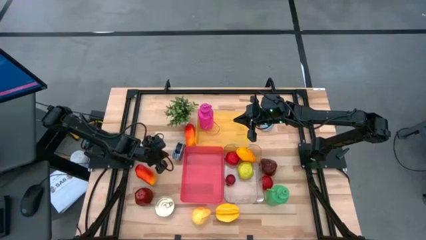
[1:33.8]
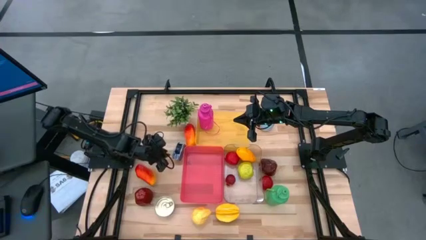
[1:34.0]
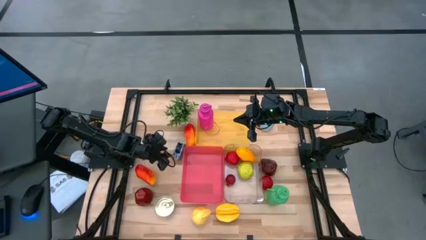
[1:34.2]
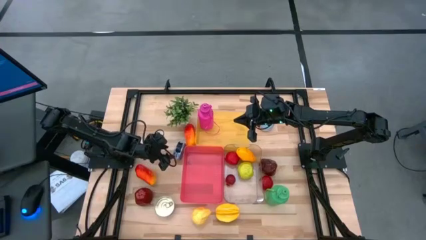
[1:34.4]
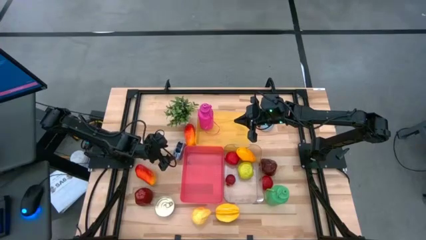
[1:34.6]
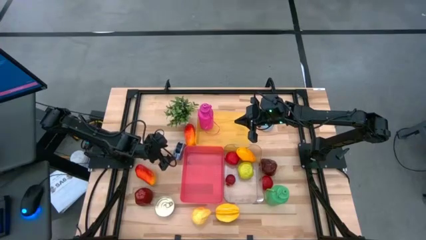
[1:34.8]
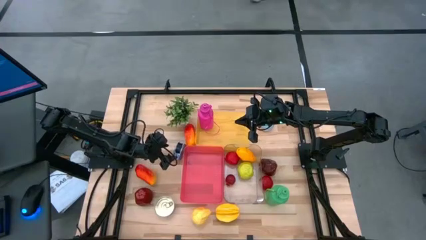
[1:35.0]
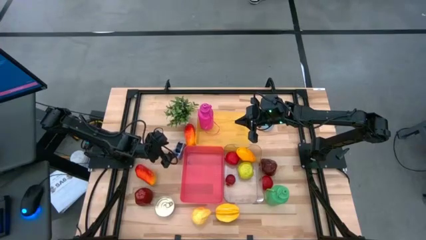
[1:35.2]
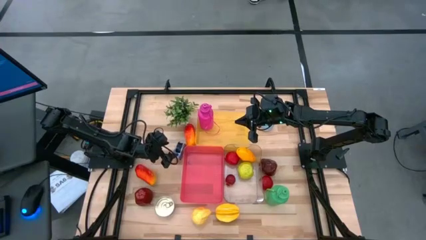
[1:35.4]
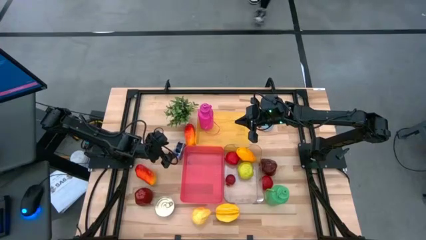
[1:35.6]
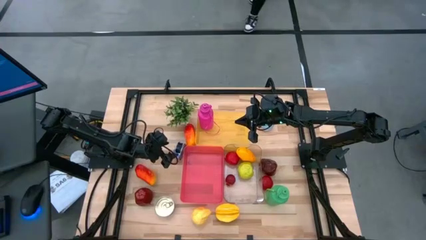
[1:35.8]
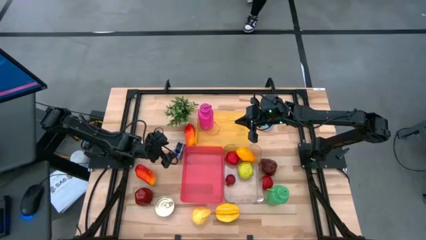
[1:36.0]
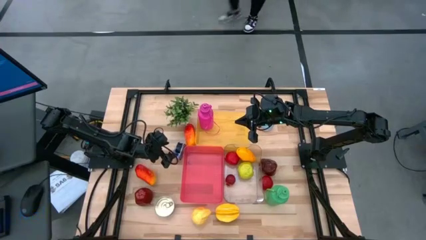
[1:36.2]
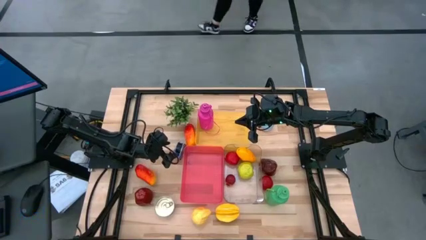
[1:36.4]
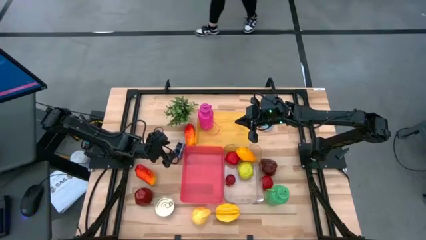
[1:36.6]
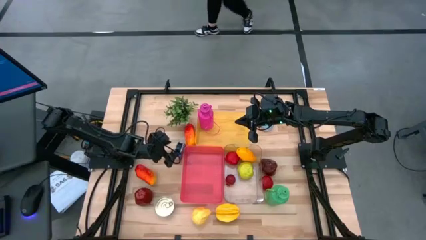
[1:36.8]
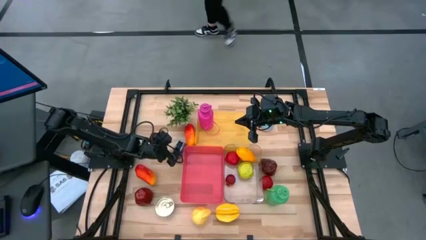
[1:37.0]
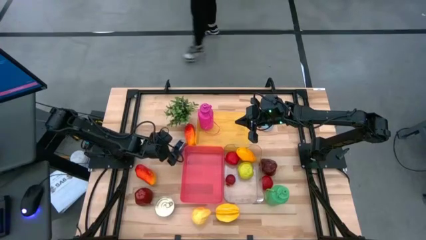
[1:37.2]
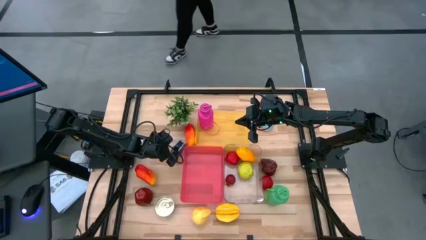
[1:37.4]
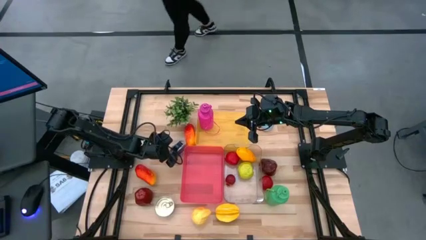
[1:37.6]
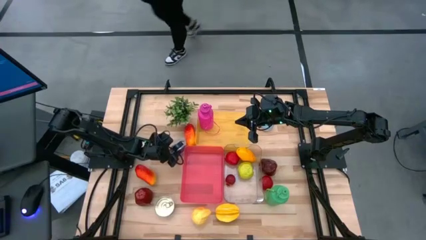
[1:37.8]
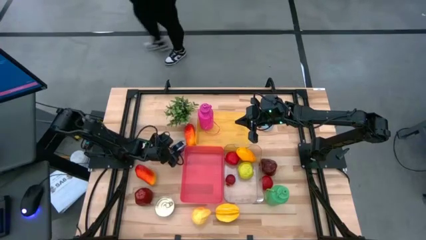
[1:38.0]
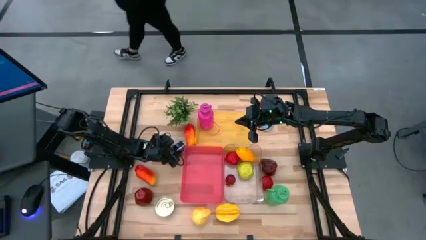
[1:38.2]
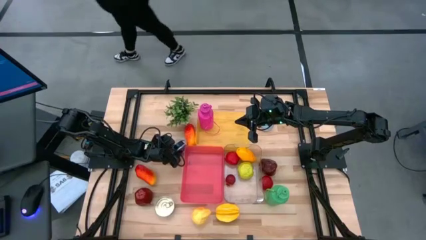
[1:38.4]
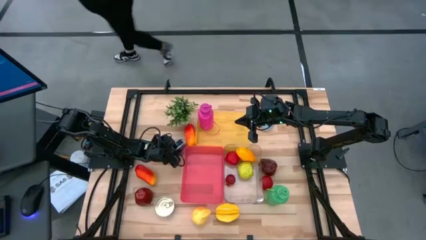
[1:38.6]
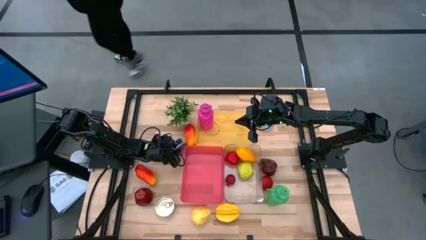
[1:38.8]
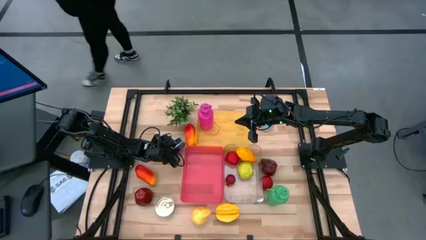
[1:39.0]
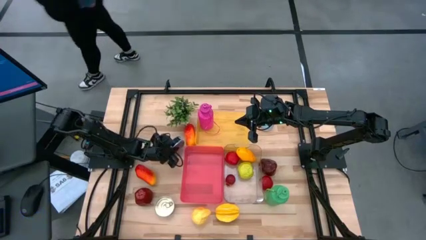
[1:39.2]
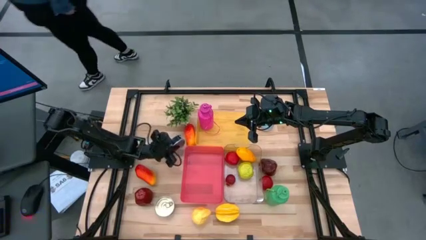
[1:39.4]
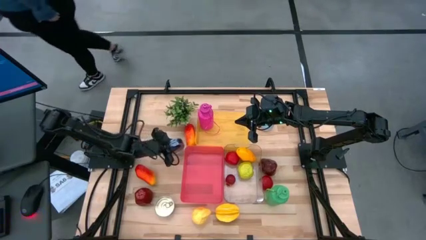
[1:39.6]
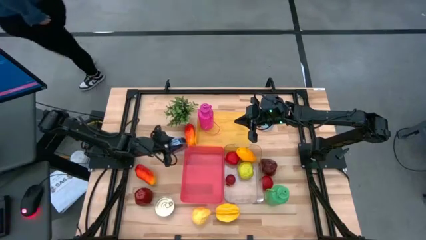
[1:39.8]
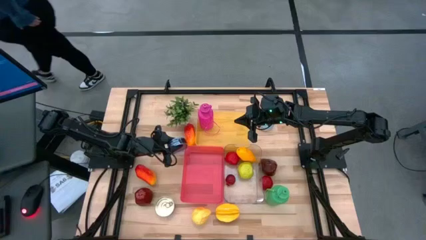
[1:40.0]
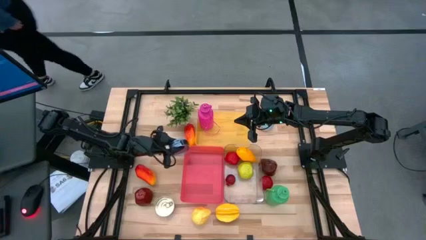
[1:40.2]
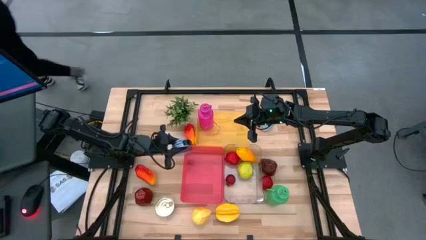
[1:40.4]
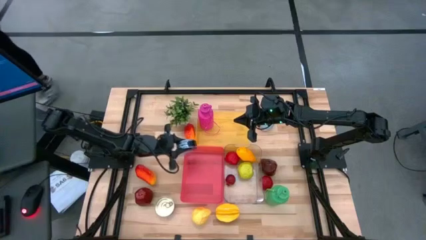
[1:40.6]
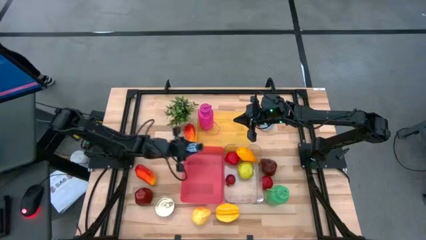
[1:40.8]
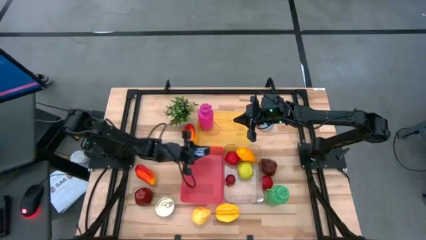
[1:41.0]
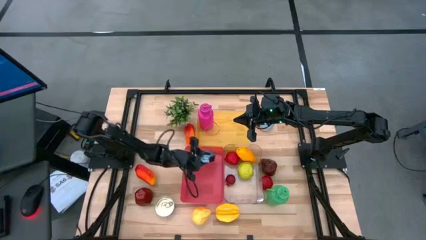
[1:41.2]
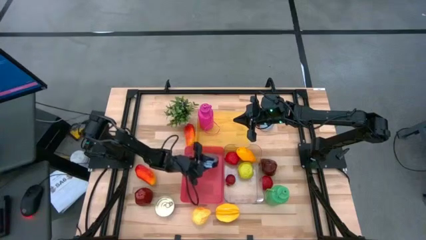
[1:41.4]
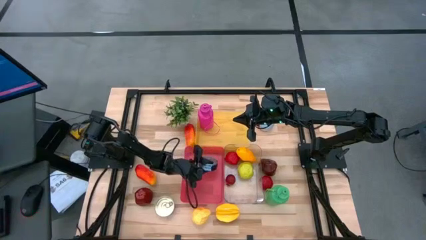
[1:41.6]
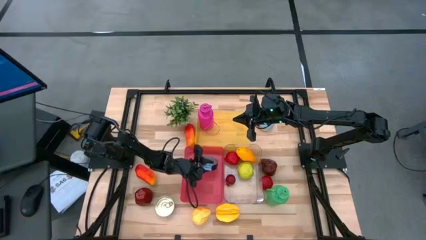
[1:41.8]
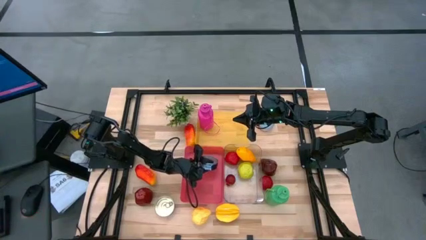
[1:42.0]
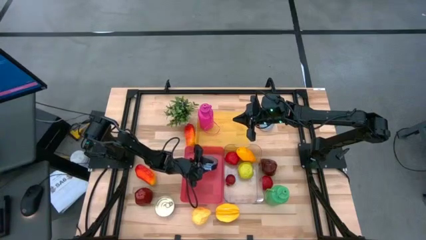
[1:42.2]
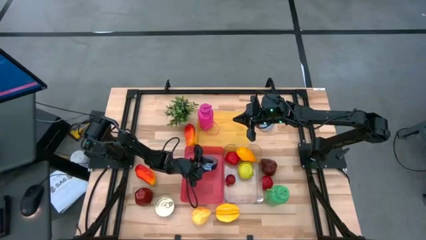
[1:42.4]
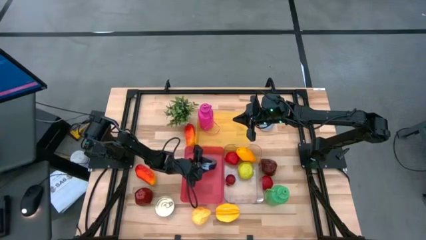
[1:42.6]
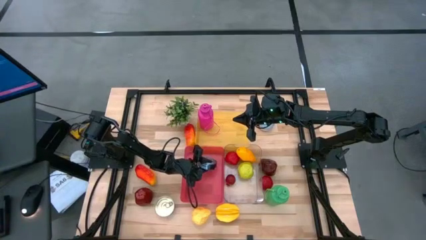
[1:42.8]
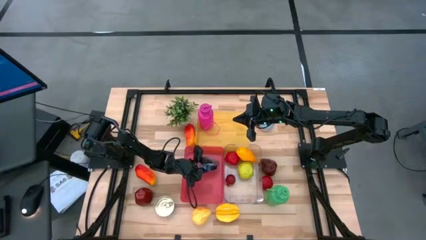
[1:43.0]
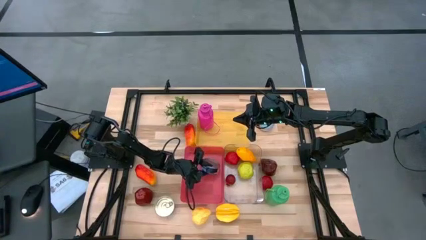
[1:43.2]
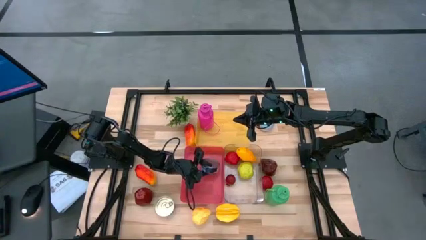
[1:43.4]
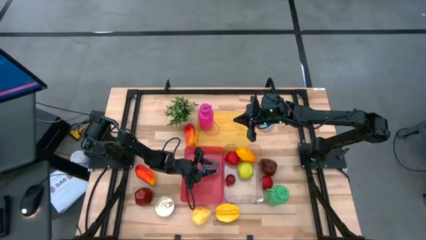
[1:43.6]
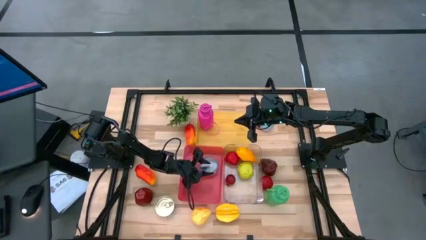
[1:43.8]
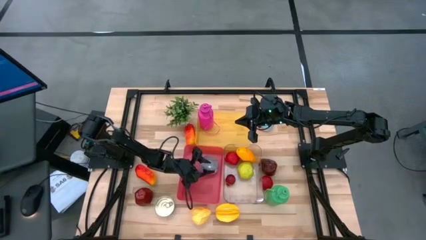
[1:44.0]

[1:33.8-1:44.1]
Task: Pick & Place Food Item
Put the blue tuna can into the red bin

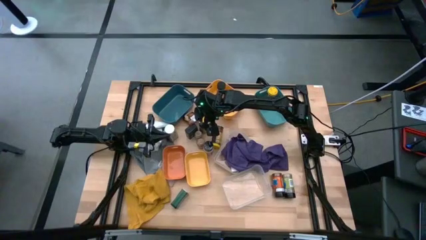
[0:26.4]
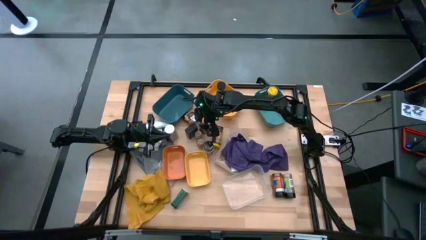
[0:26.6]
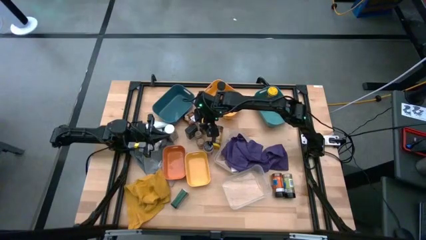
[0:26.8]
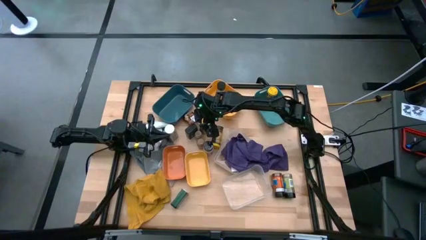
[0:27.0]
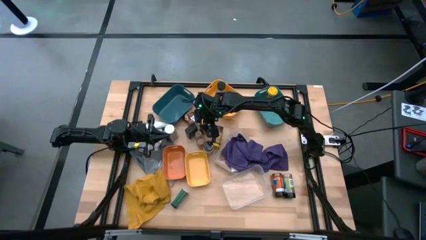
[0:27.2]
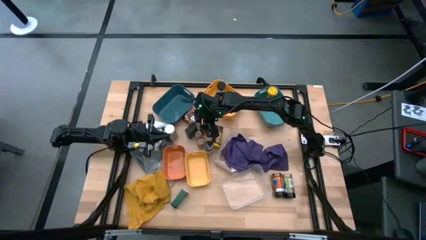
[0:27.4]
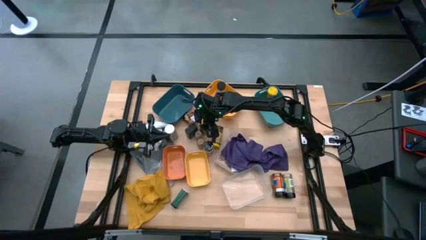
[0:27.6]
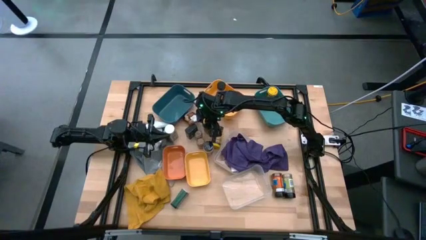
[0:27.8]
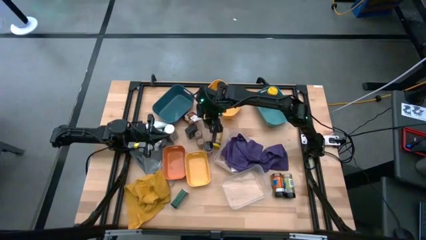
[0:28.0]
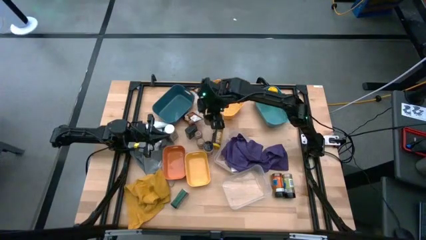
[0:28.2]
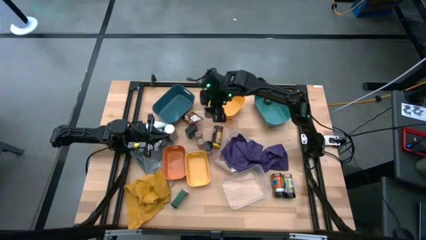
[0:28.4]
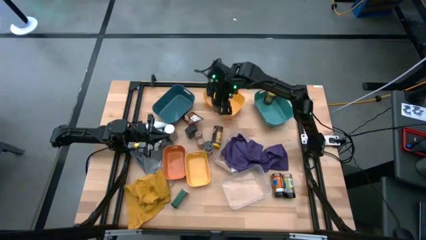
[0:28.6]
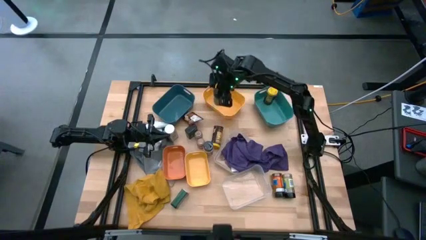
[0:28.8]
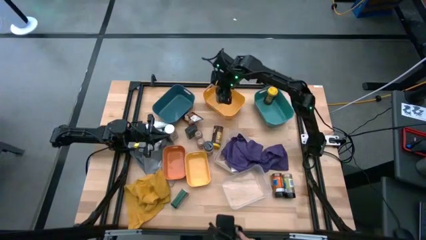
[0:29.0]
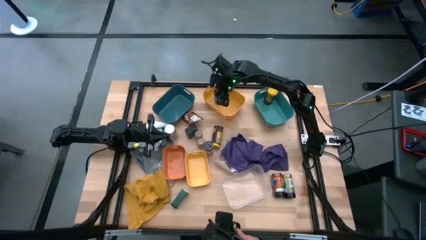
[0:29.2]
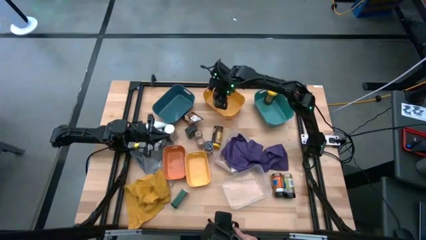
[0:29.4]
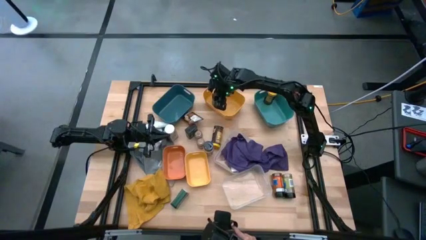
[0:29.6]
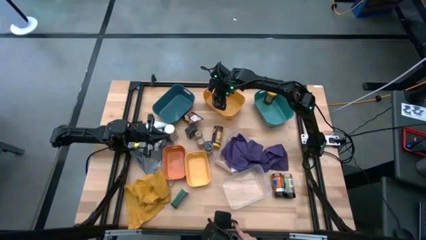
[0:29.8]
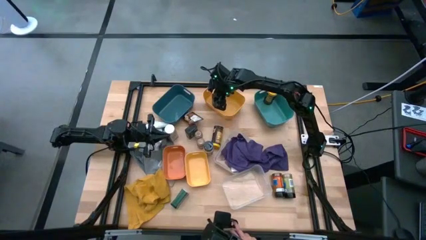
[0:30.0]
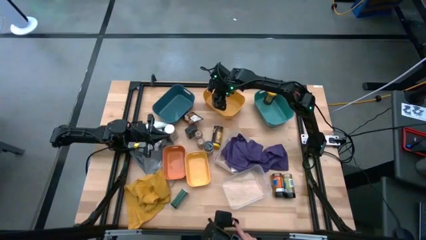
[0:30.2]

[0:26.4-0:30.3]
Task: Sort spices by type
Put the green spice bottle into the yellow bin
